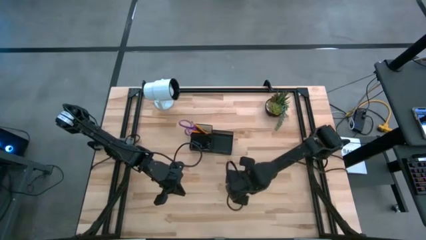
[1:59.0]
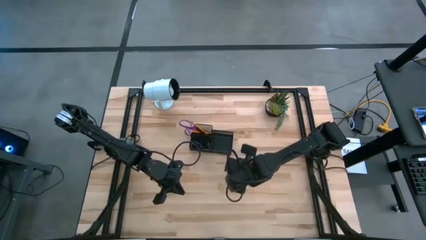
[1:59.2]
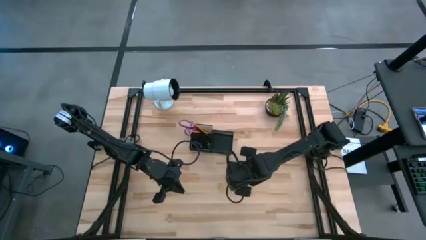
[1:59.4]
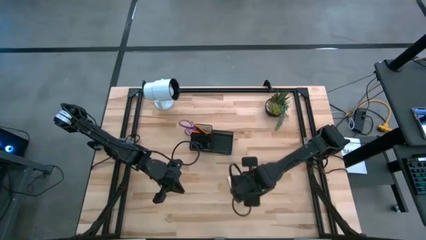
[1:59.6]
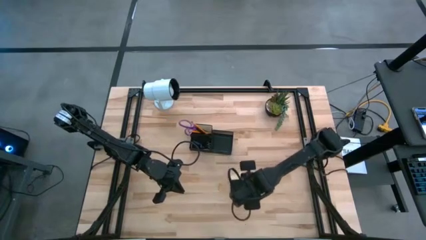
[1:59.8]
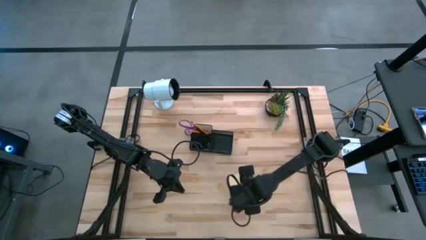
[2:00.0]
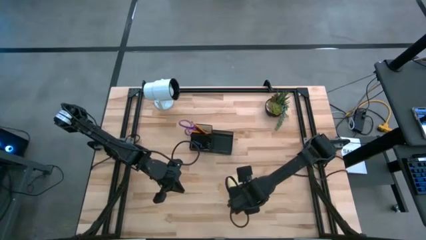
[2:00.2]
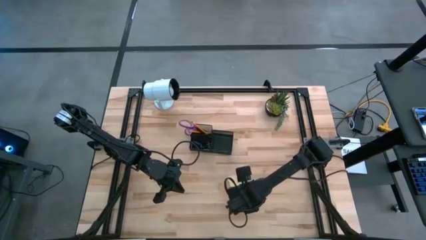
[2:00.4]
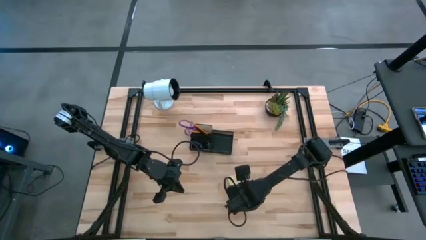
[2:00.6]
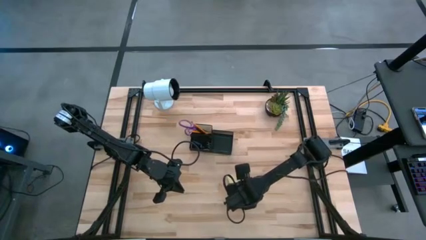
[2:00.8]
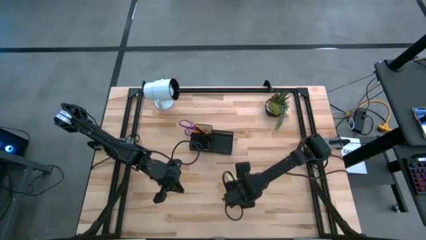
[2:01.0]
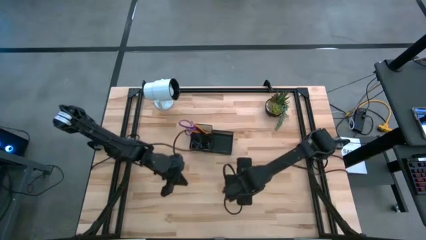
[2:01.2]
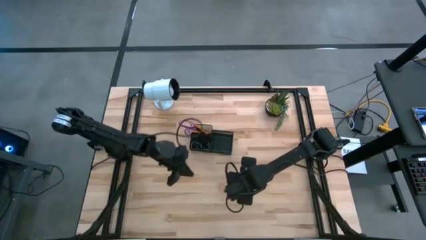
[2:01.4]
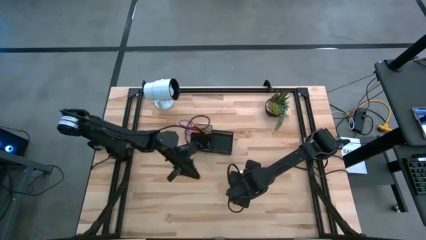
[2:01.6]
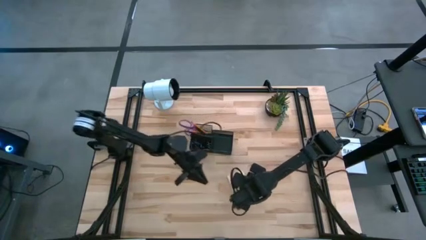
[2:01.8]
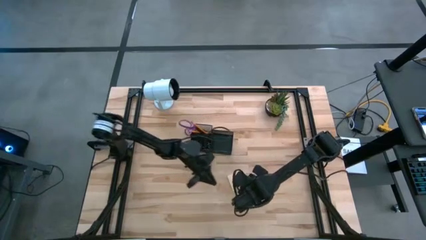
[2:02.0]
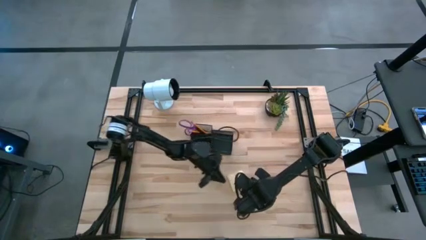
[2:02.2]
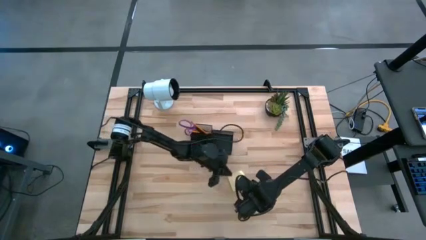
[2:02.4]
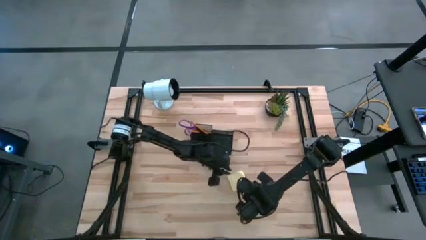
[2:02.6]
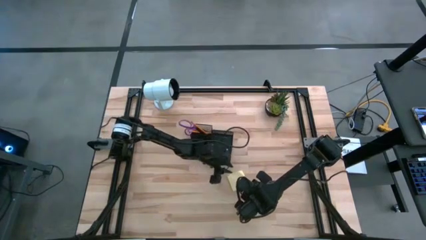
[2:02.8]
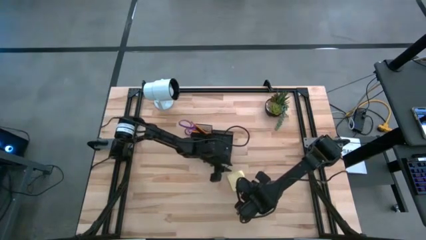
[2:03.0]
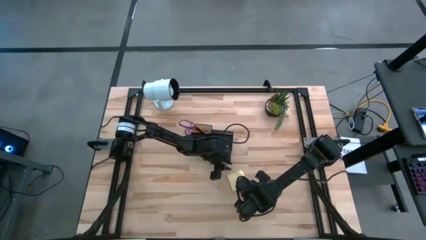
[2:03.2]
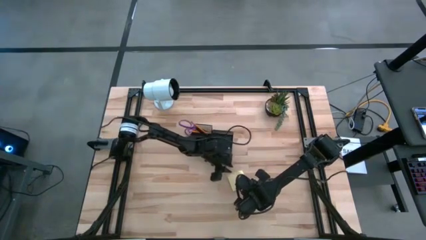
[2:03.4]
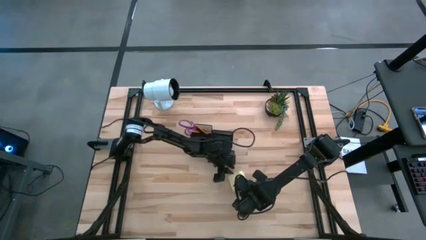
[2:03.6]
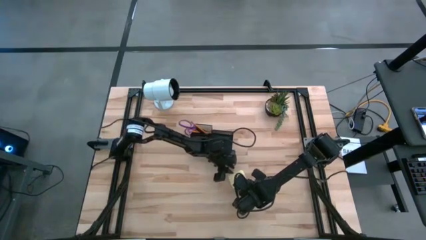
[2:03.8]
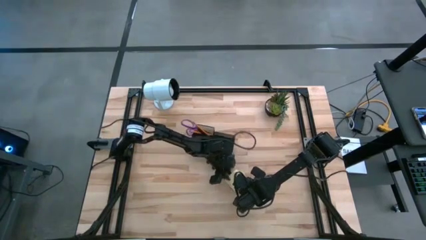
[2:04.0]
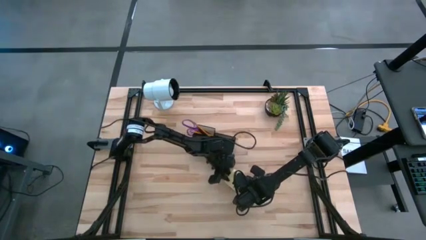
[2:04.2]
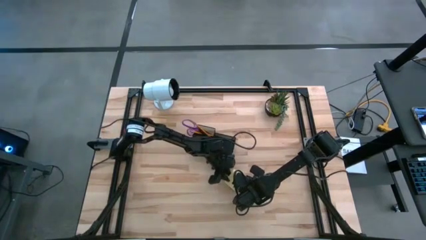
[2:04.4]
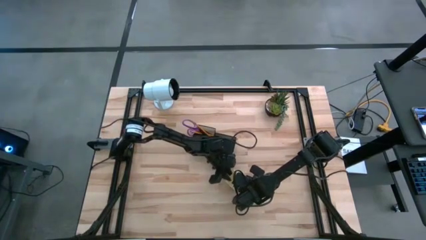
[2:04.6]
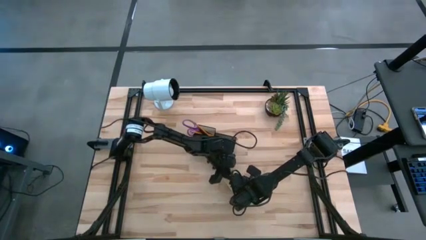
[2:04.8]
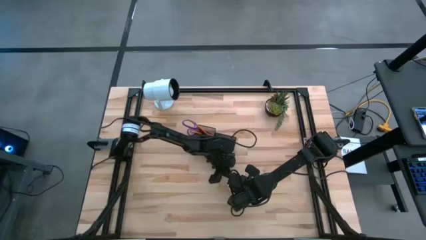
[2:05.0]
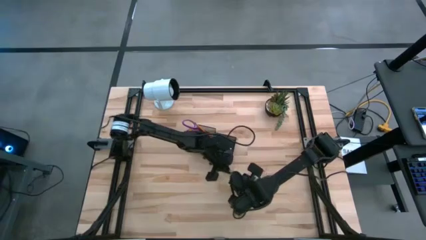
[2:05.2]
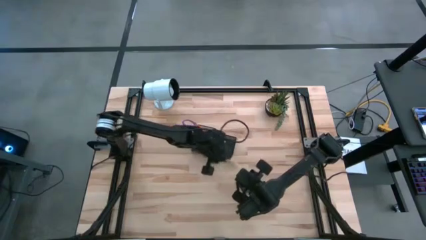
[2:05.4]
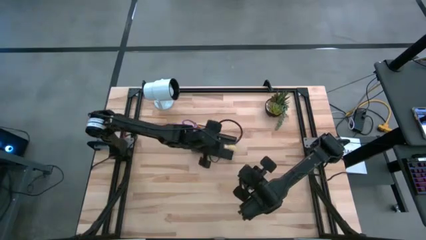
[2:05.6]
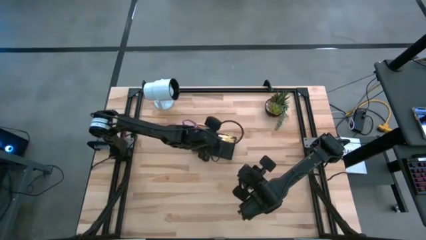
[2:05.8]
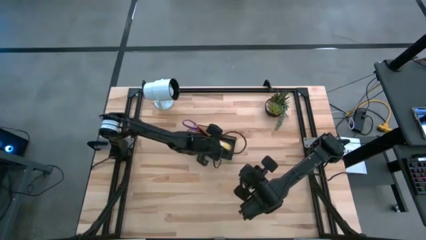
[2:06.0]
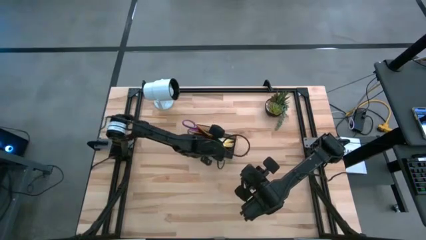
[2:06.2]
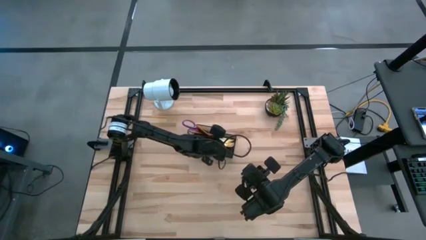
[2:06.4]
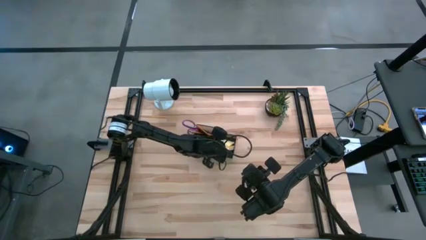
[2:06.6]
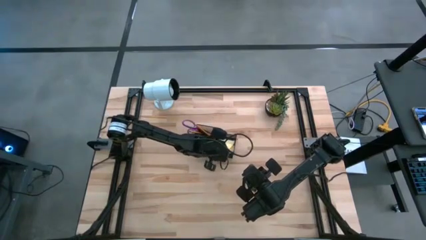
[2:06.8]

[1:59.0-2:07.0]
Task: Pick and place office supplies into organizer
Put the yellow sticky note into the black desk organizer

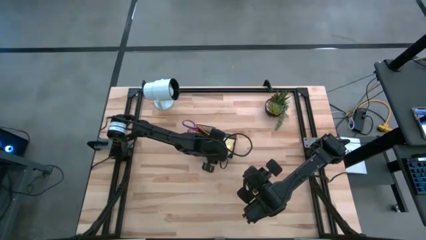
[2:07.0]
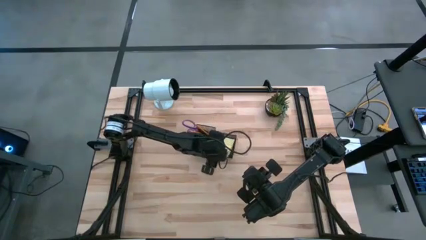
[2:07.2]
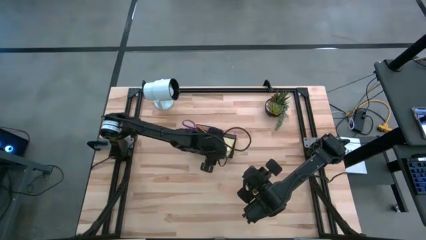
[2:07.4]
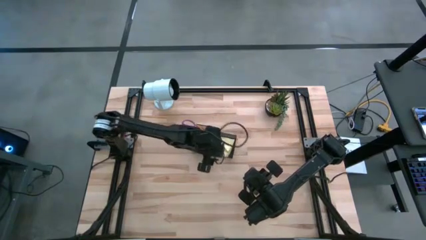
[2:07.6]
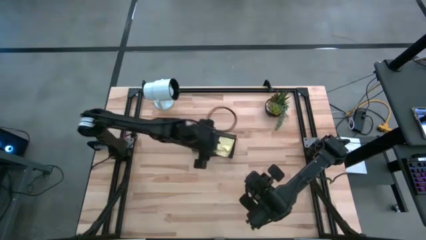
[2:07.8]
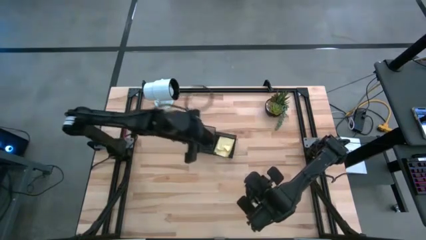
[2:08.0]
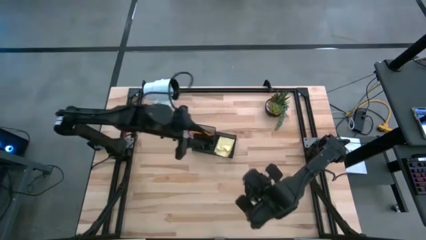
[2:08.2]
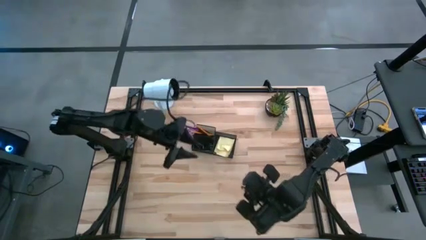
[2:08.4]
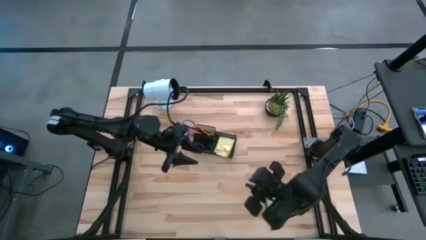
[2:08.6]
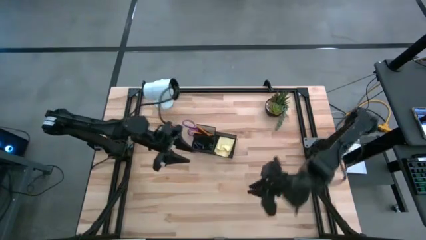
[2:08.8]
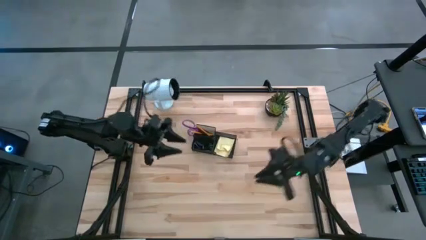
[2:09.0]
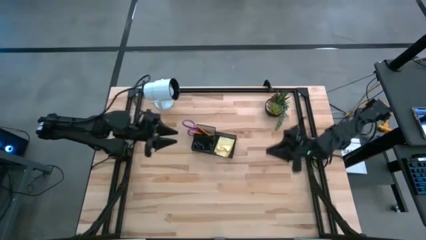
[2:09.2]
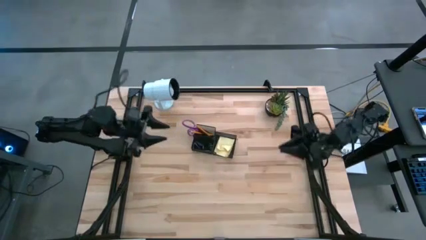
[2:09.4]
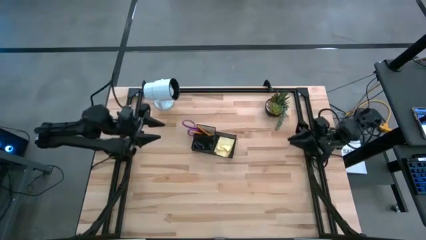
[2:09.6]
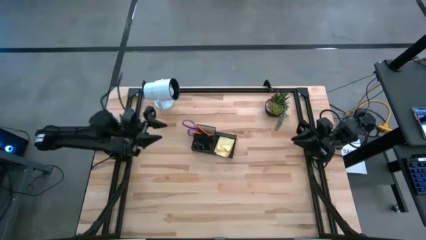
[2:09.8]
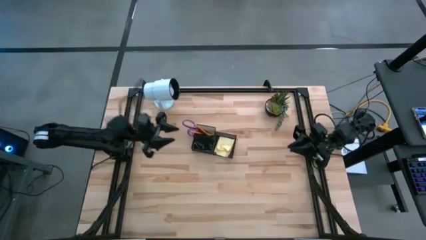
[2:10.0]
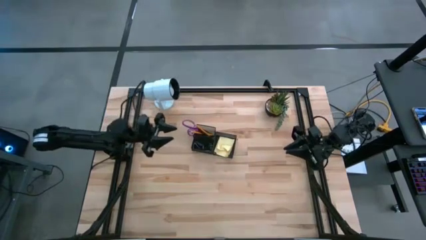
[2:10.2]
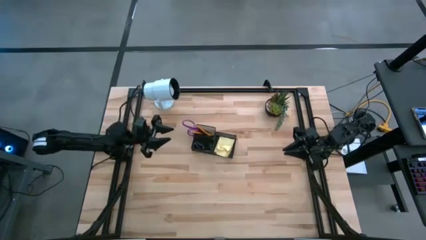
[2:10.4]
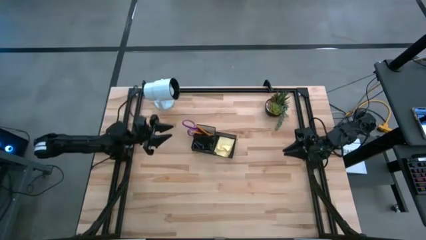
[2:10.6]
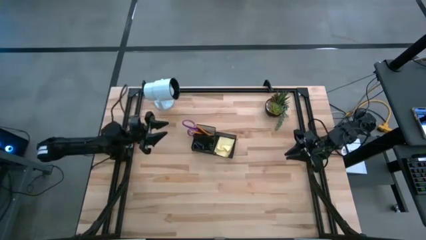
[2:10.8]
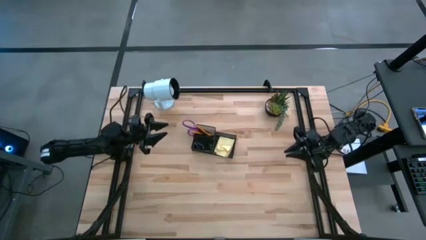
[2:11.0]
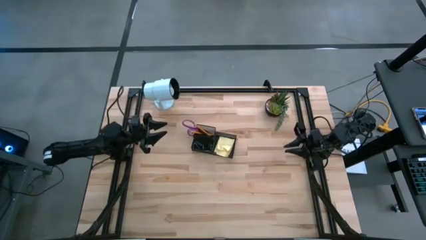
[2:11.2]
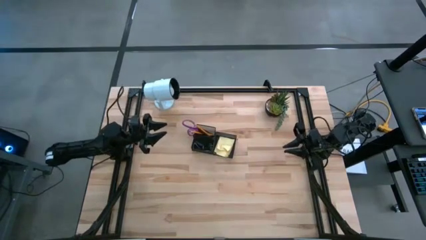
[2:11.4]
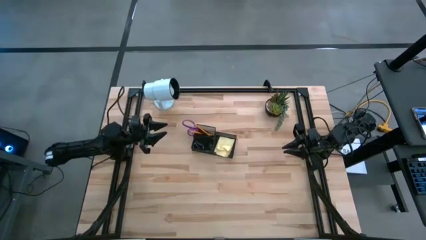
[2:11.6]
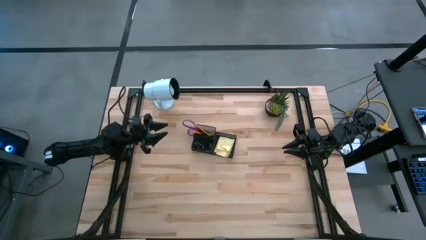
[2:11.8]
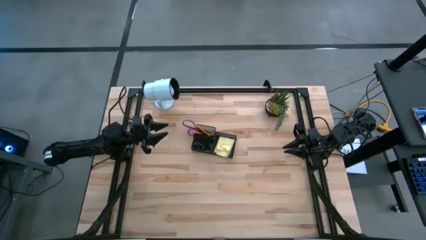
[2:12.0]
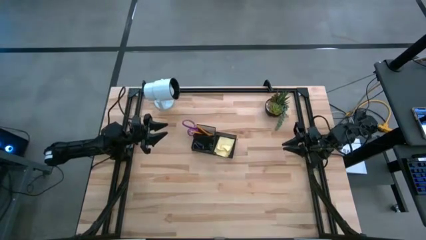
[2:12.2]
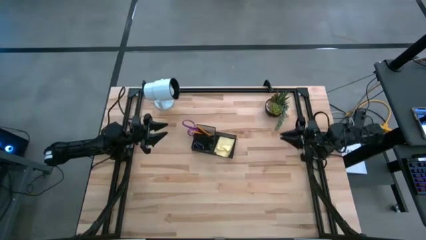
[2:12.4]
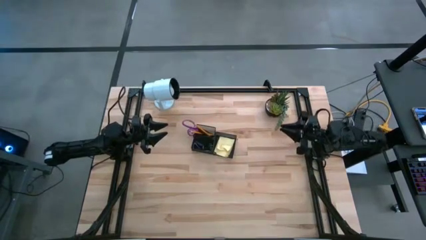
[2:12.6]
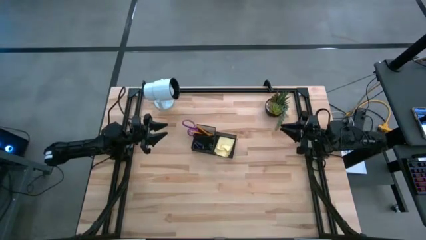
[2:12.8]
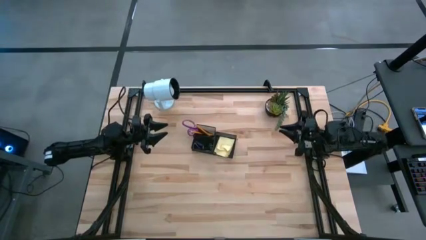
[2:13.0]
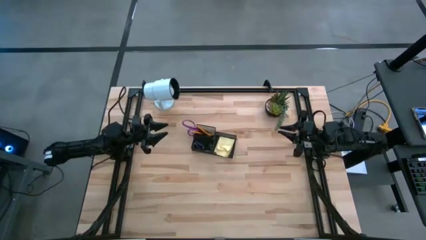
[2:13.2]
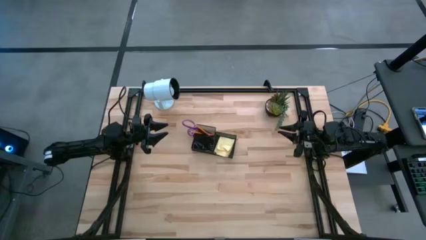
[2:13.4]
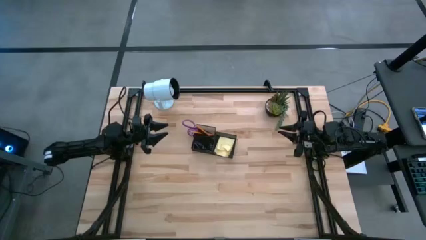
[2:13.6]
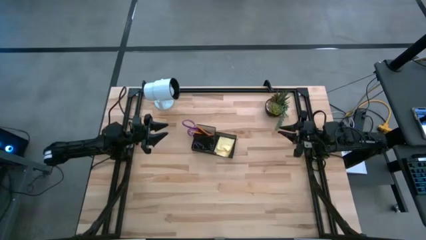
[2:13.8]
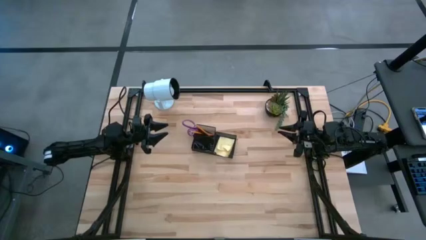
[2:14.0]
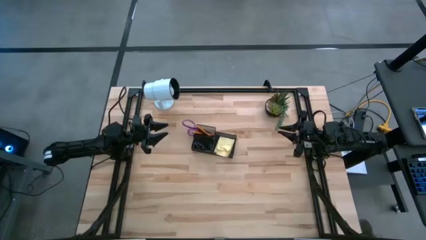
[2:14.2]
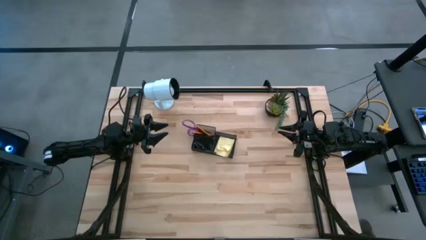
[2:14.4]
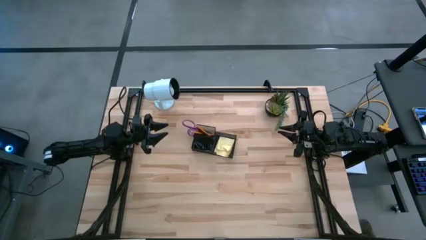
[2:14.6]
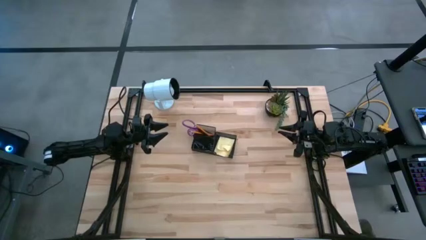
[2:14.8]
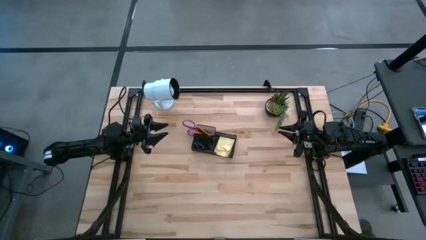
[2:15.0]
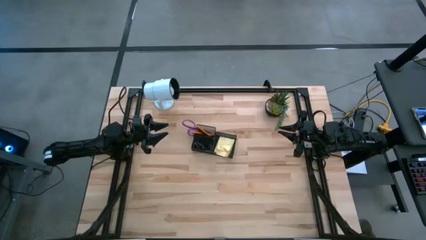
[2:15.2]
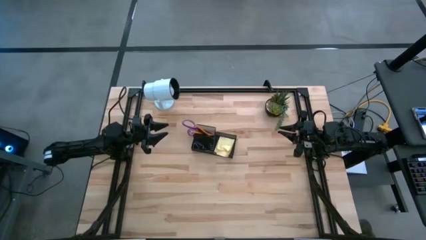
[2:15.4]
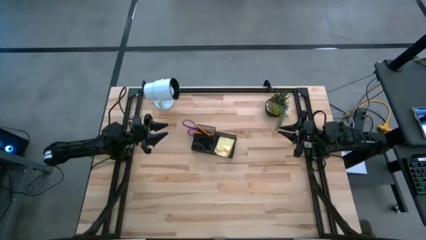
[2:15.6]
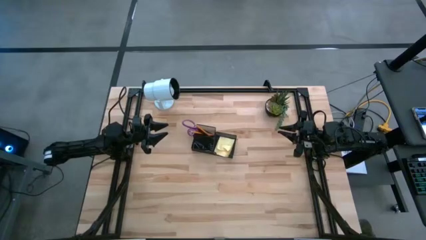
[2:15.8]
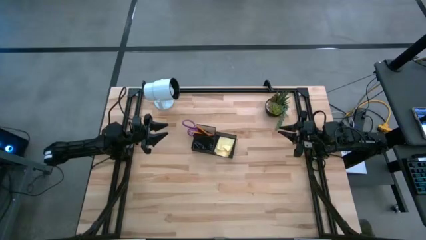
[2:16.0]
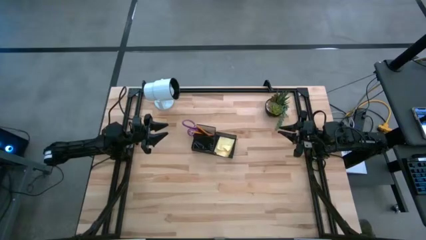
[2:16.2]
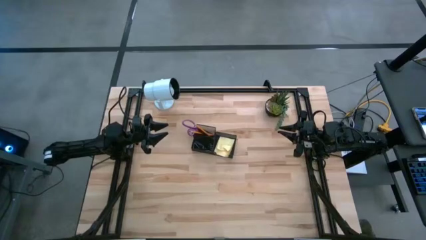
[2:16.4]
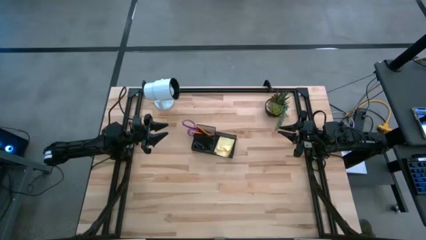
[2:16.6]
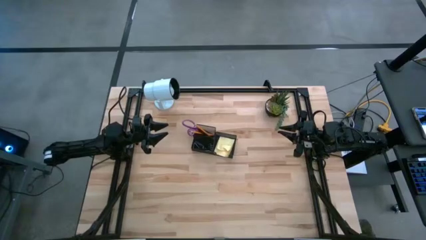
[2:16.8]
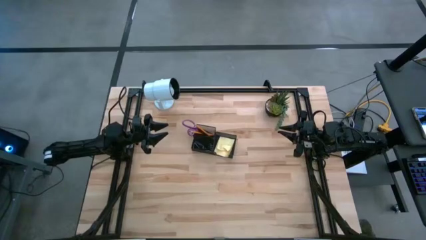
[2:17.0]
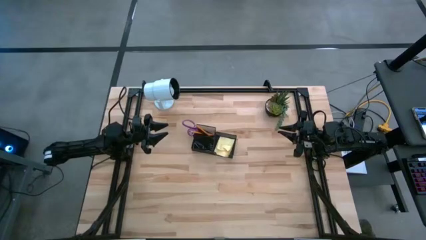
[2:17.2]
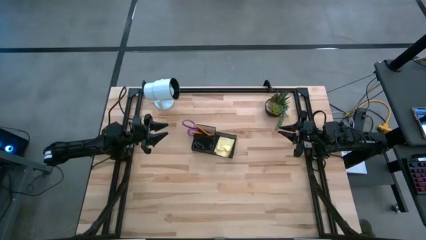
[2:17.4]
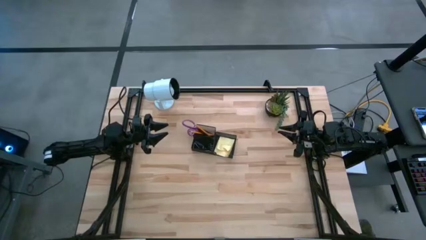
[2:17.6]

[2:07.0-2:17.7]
Return to Home Position
